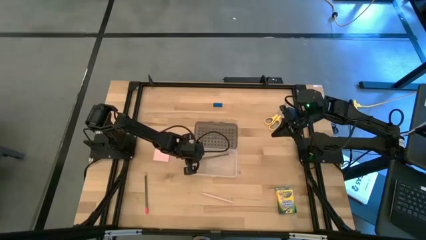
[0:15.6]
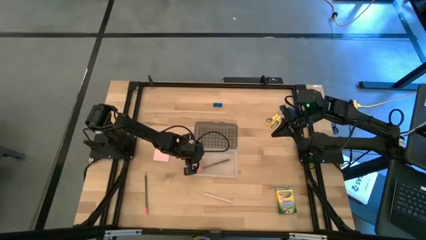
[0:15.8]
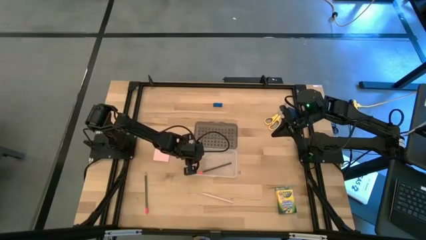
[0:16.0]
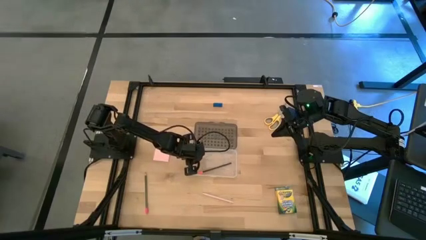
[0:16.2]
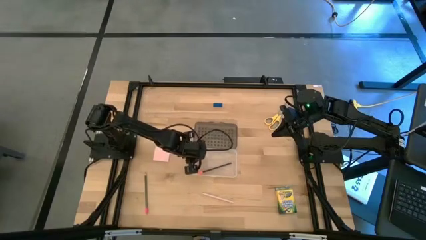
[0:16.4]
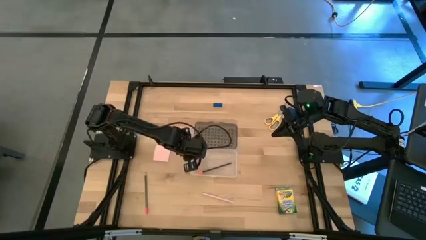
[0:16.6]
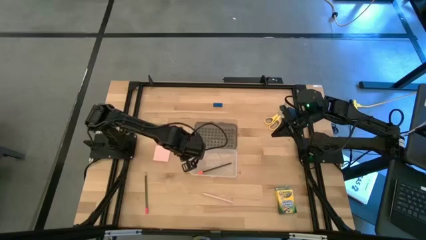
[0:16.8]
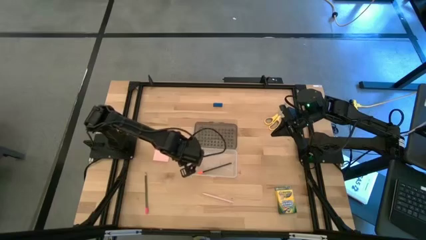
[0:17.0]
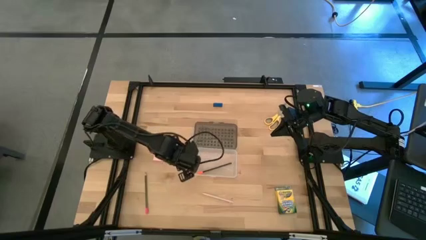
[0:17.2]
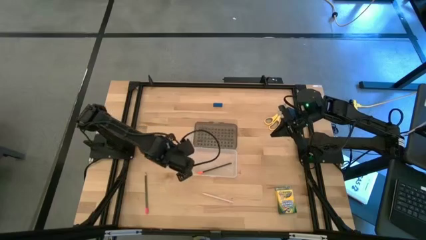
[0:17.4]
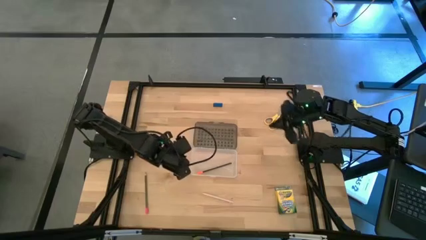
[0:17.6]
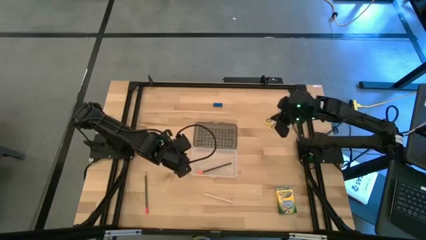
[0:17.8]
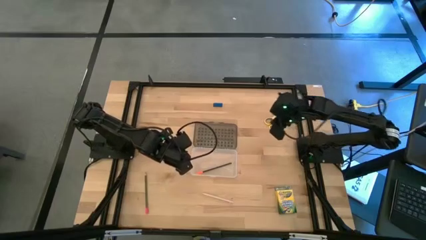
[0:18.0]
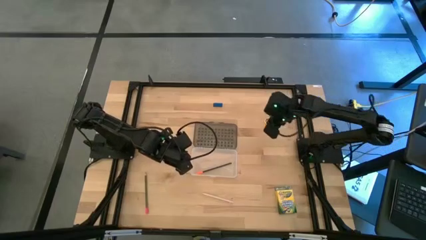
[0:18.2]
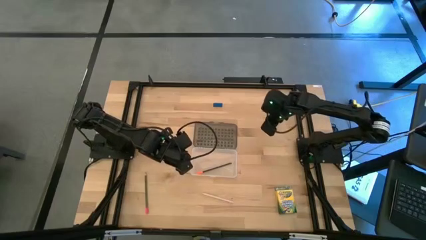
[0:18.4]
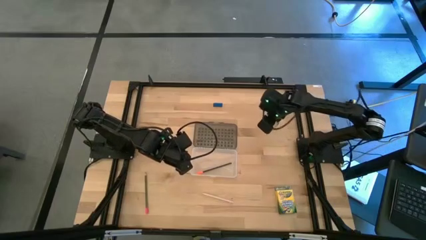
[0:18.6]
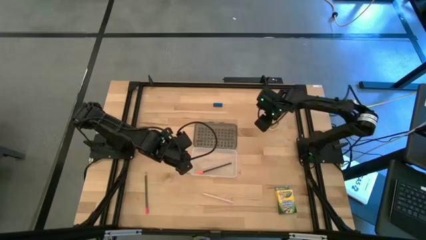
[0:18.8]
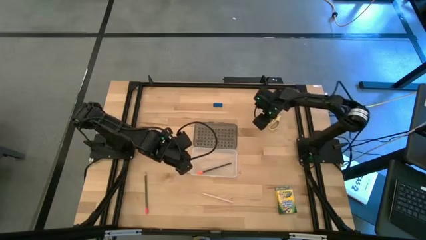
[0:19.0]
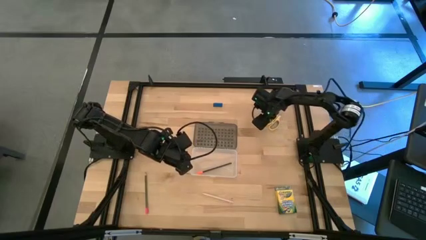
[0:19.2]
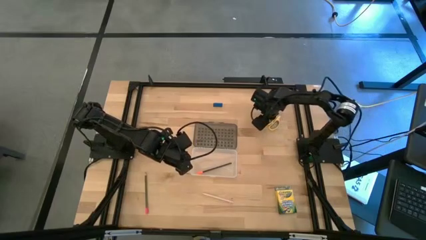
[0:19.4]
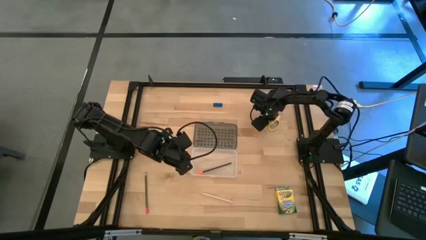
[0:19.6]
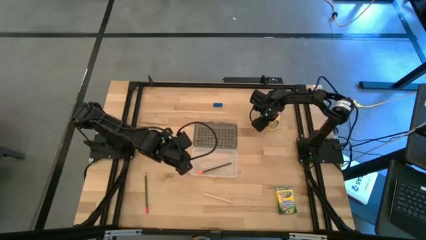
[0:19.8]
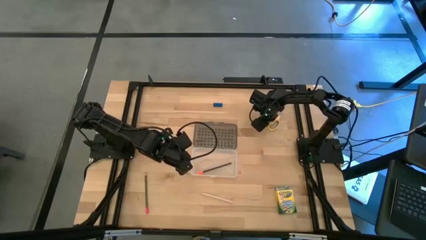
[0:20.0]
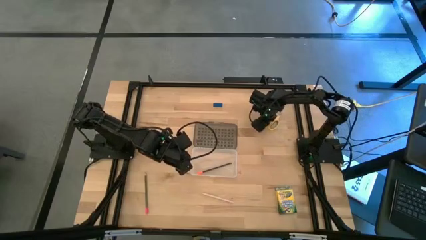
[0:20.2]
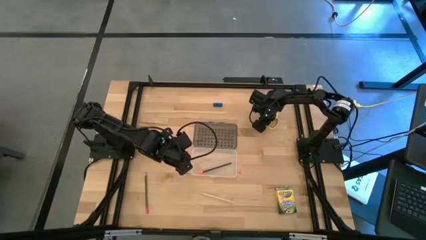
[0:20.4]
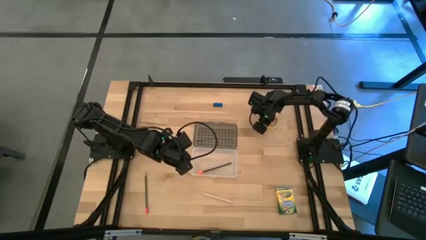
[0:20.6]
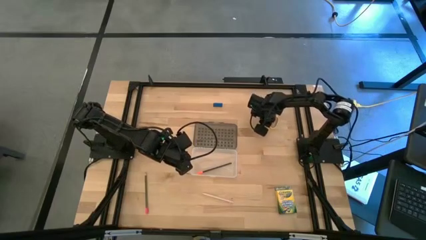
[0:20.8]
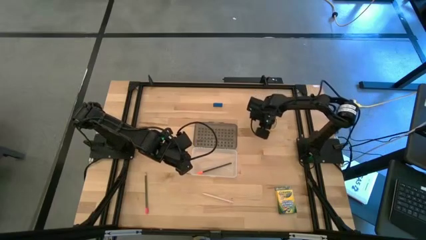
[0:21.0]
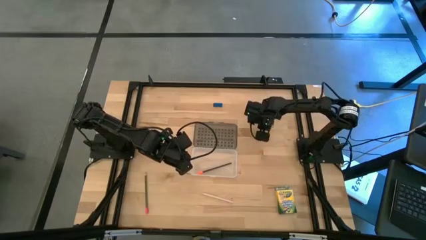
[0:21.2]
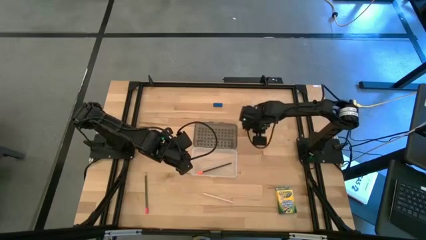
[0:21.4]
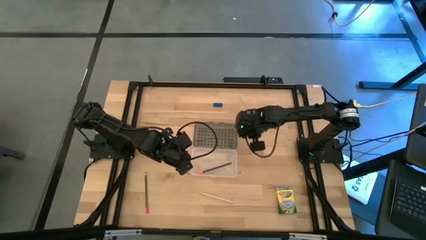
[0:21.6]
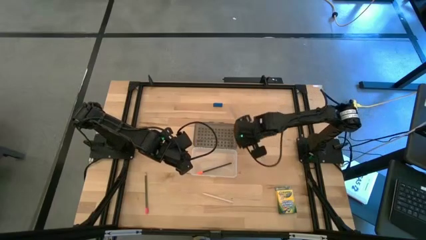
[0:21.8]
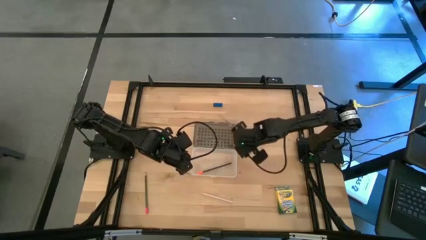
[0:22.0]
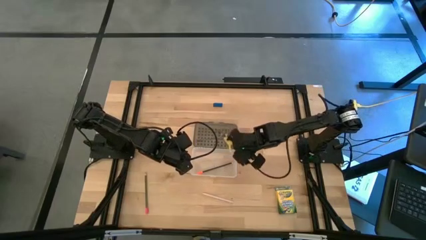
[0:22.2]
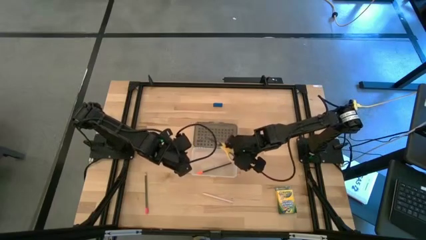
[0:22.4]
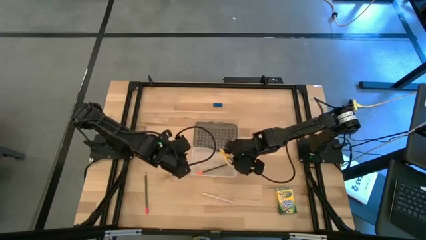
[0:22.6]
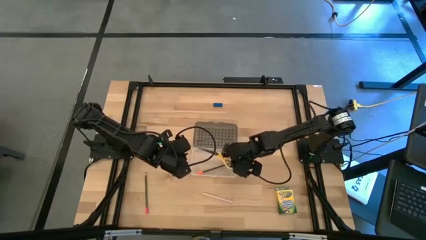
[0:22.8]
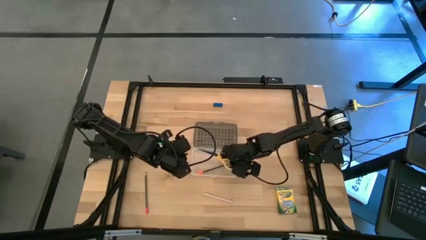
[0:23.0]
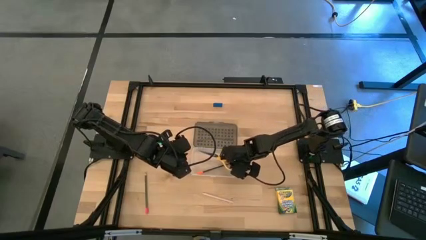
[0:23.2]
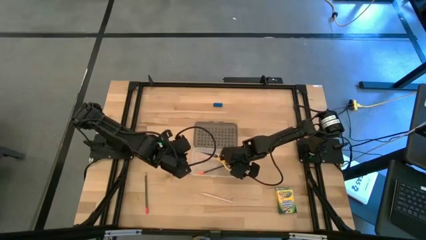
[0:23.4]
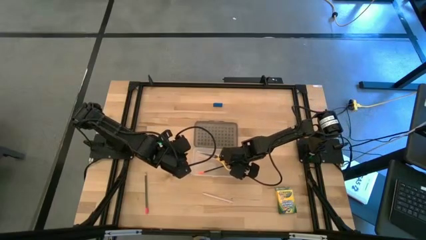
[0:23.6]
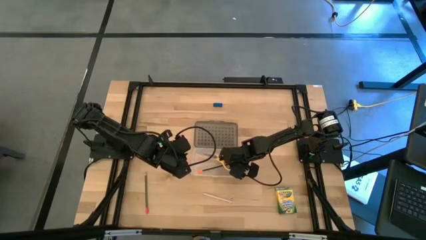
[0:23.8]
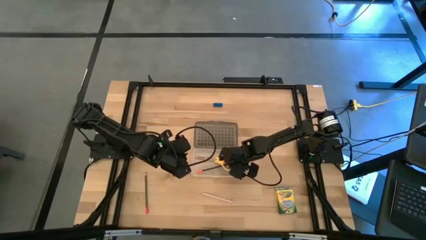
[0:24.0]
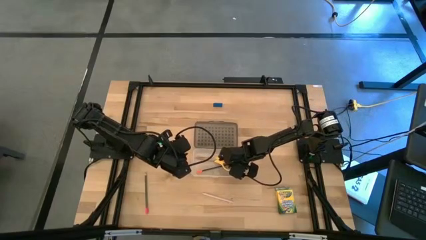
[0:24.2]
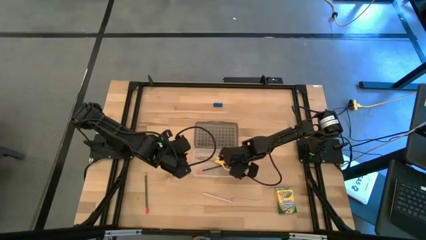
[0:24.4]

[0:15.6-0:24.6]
Task: Pack school essentials
Put the yellow scissors into the black supply box

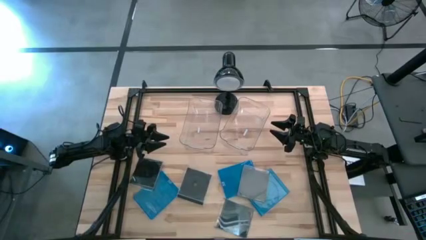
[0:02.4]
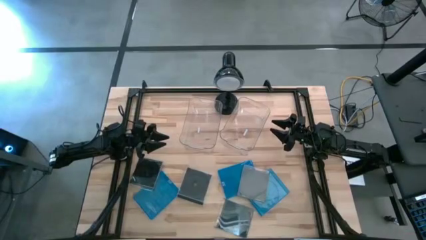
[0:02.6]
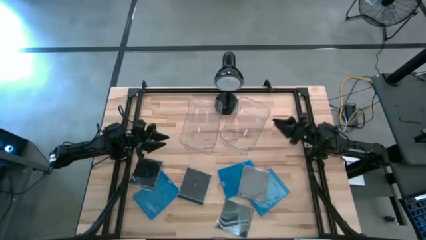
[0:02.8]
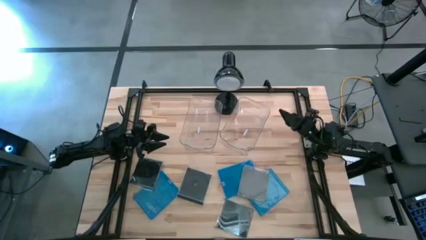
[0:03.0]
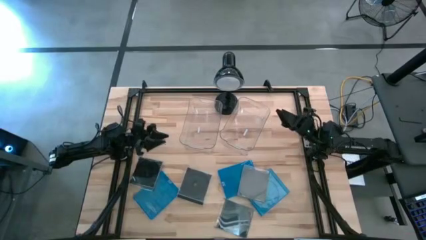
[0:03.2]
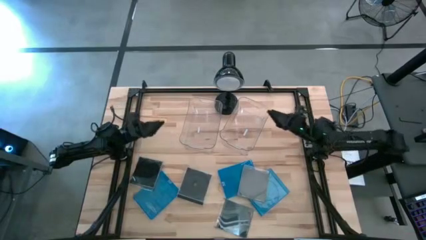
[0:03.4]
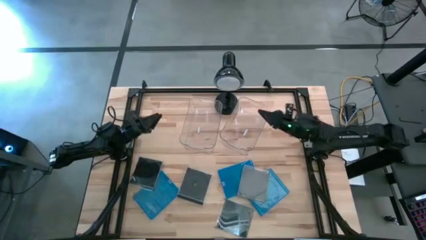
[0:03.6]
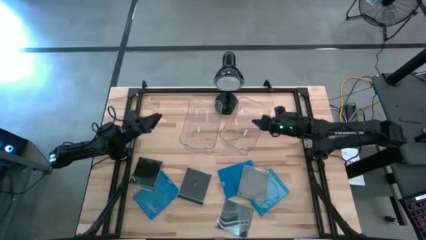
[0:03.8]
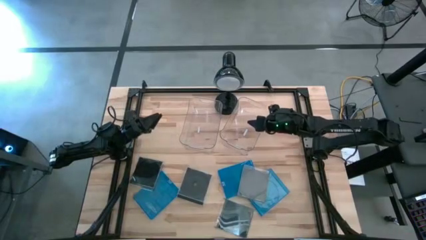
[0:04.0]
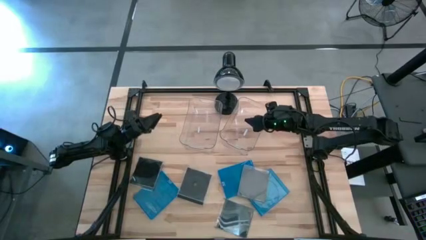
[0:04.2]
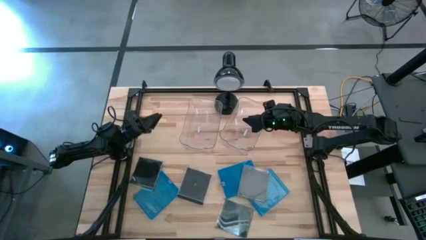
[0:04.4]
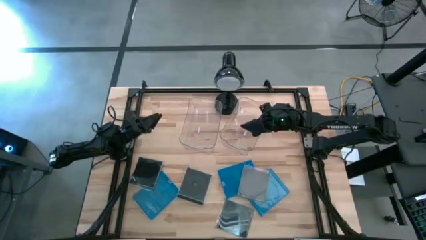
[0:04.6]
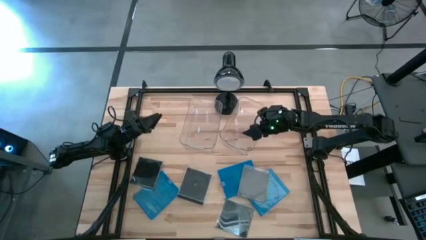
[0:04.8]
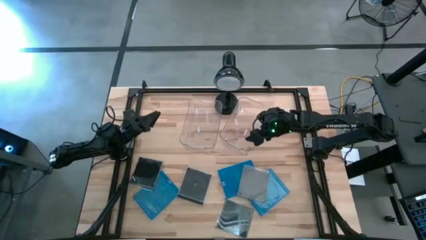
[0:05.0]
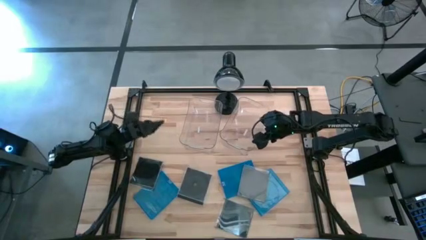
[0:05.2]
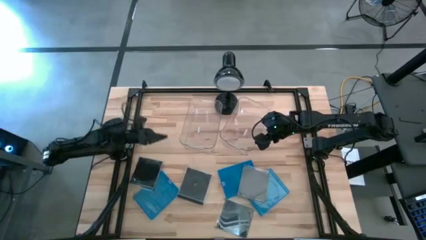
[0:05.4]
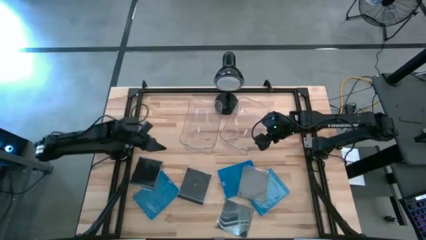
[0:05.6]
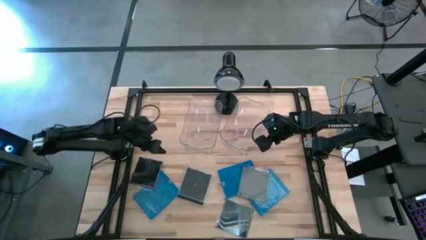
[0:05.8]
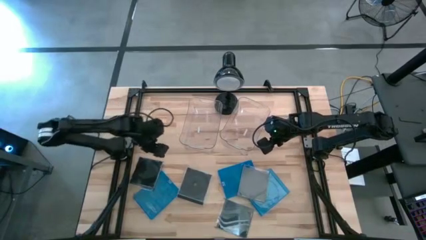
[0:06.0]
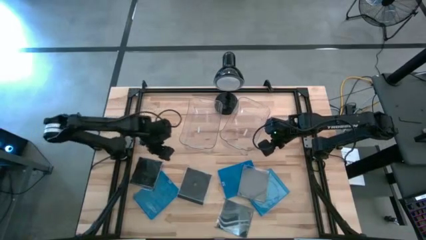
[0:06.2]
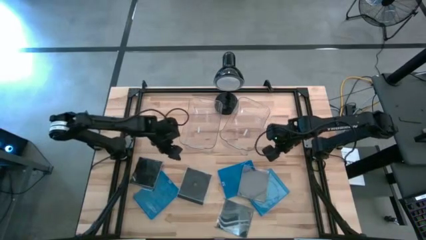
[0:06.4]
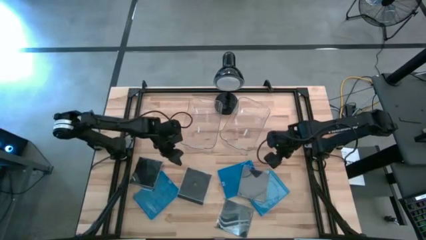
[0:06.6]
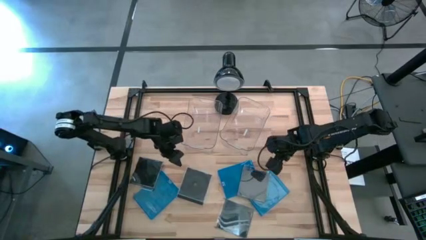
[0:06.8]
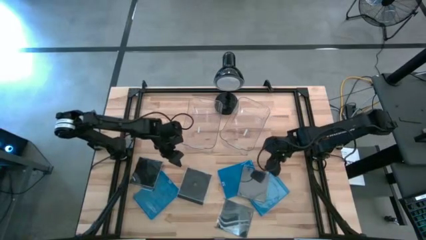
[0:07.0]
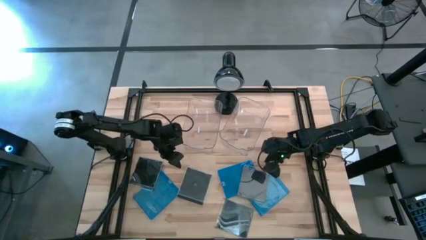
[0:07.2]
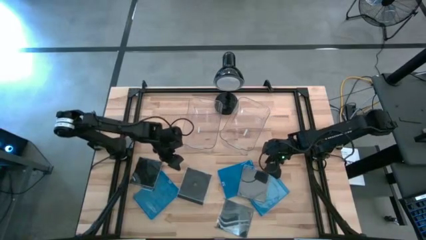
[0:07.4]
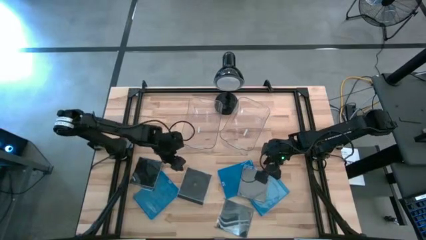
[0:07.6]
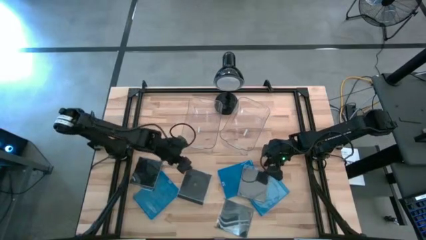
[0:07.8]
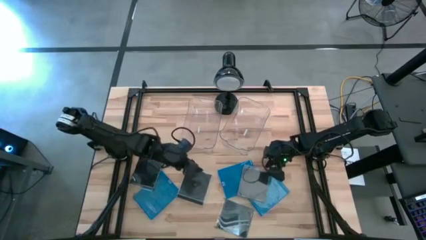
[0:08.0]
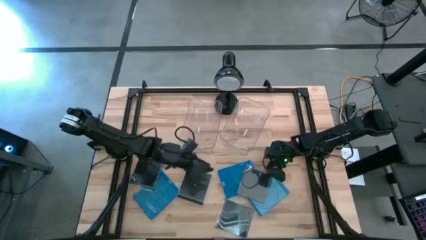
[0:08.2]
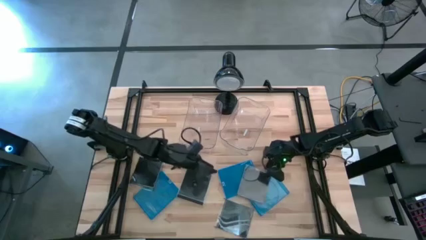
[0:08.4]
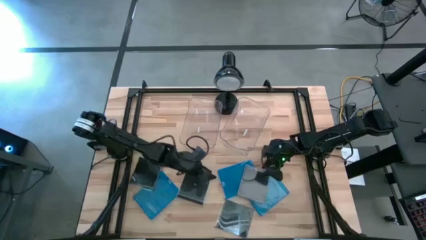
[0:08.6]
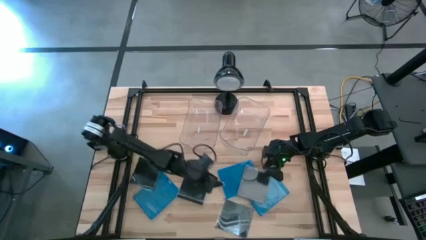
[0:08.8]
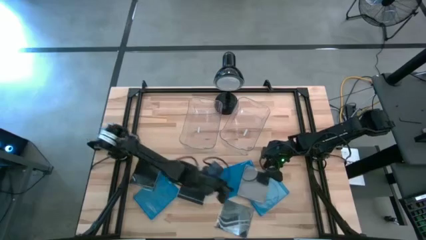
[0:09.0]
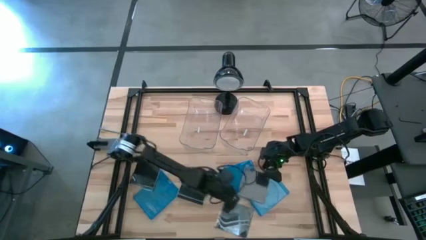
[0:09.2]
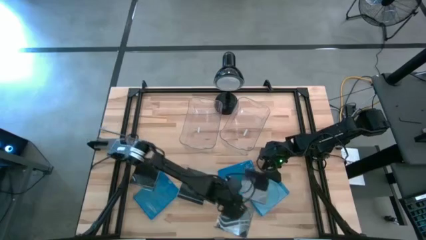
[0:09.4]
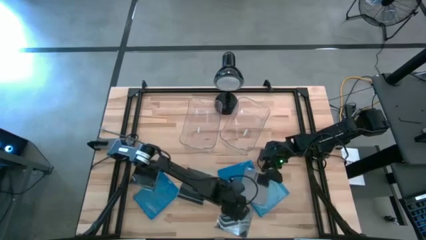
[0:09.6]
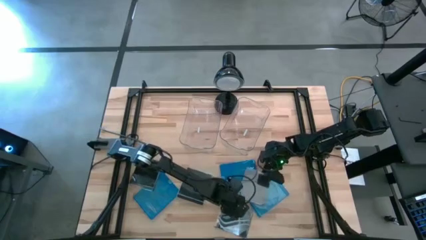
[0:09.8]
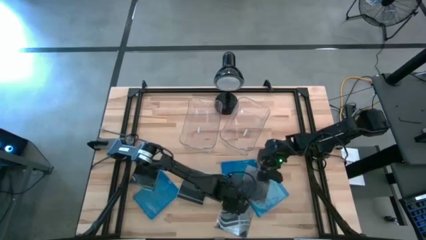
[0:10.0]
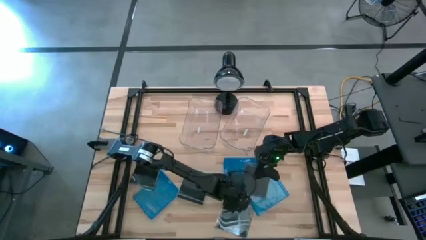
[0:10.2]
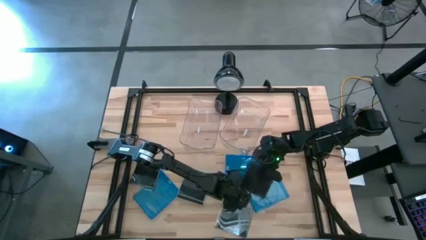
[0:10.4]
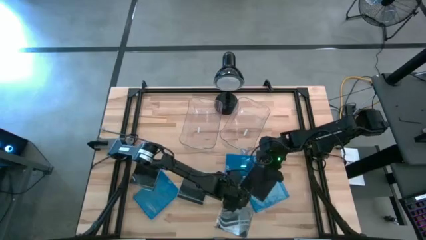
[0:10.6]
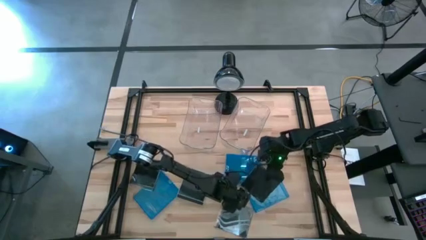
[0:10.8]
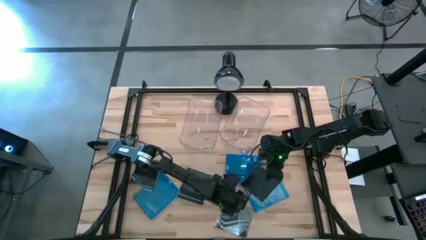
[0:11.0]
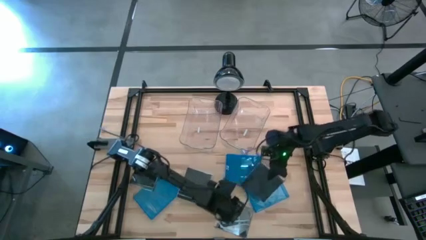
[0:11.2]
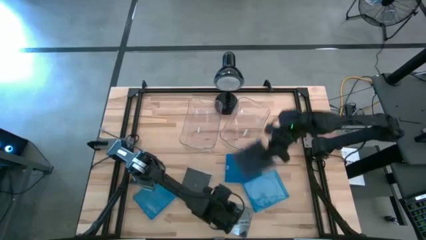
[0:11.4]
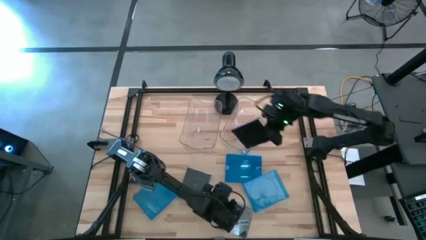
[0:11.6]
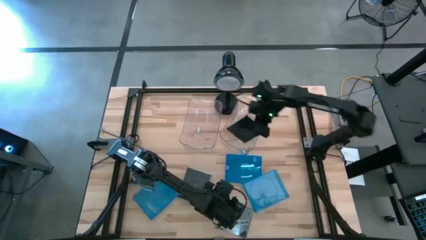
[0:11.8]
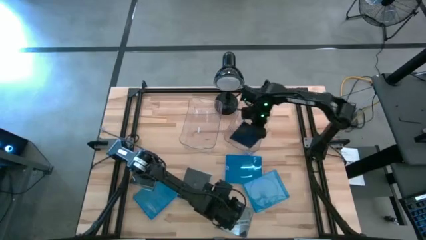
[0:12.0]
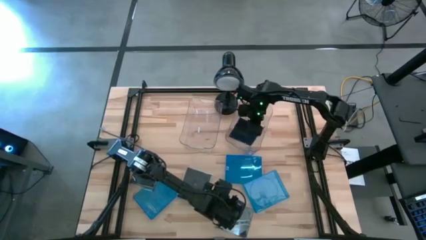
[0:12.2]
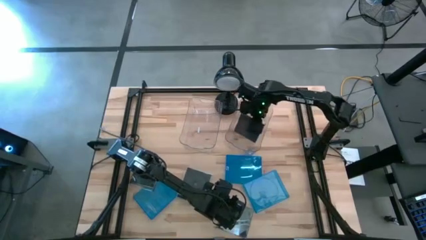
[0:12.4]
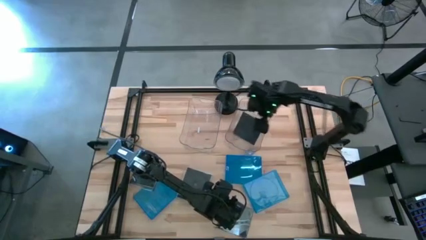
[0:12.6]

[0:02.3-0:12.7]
Task: Pick & place jewel cases by type
Put the black CD case into the right transparent bin
